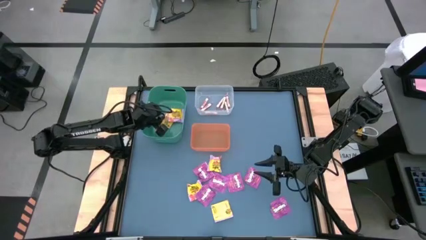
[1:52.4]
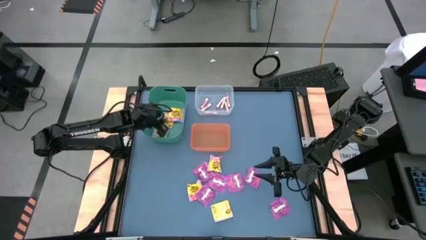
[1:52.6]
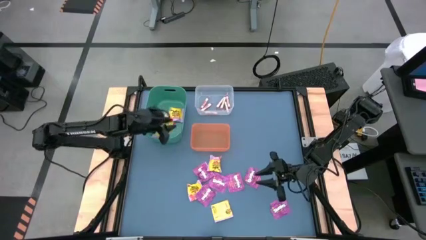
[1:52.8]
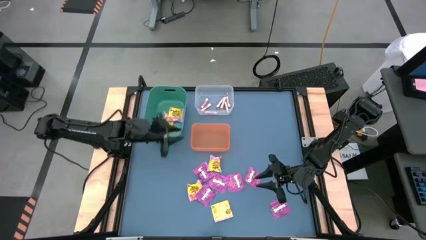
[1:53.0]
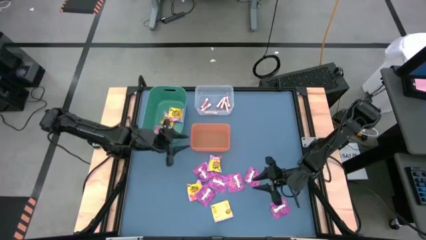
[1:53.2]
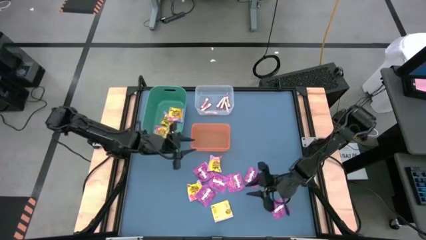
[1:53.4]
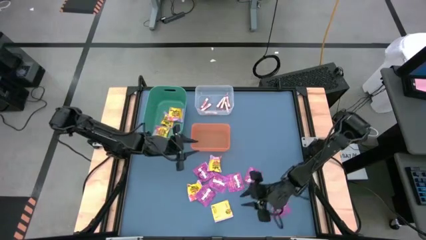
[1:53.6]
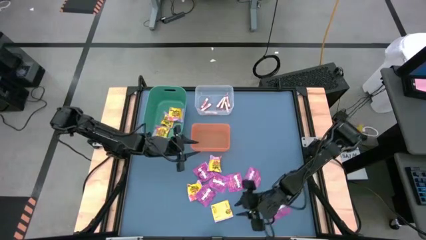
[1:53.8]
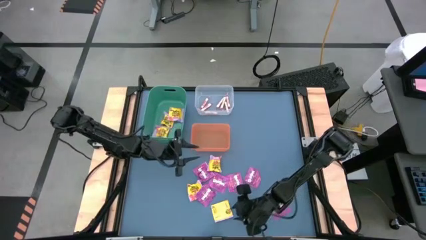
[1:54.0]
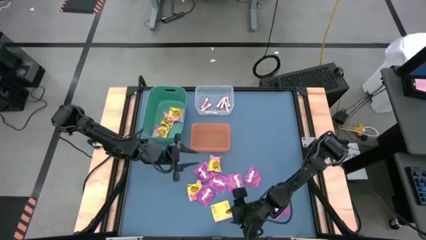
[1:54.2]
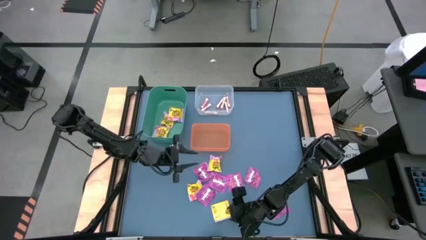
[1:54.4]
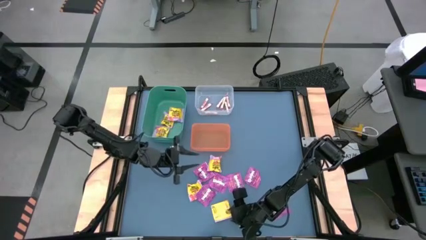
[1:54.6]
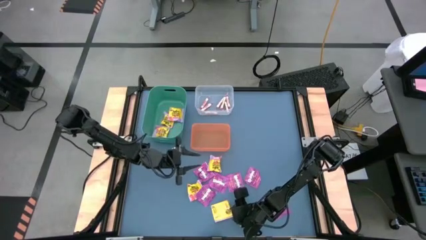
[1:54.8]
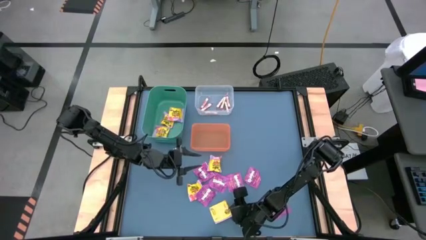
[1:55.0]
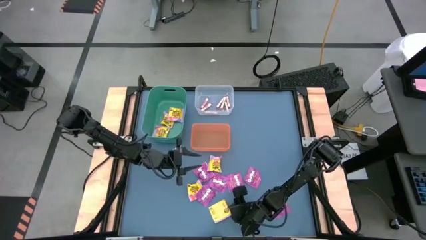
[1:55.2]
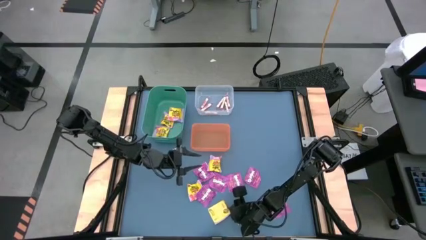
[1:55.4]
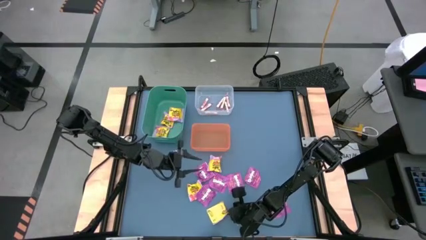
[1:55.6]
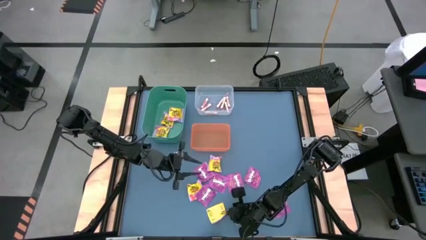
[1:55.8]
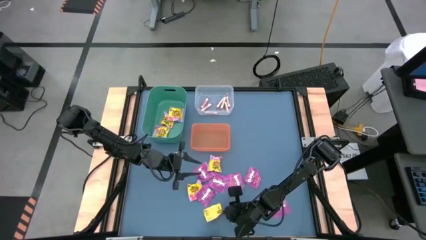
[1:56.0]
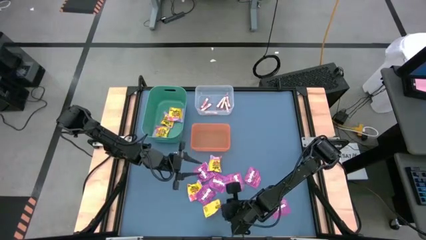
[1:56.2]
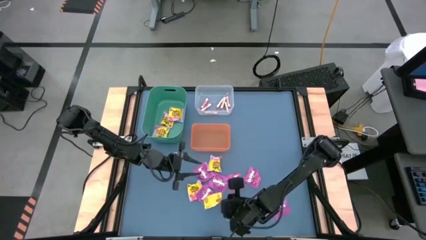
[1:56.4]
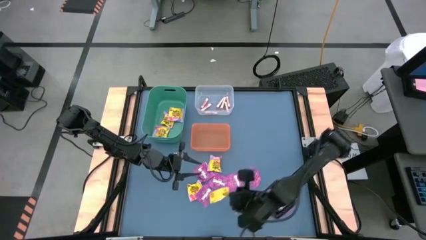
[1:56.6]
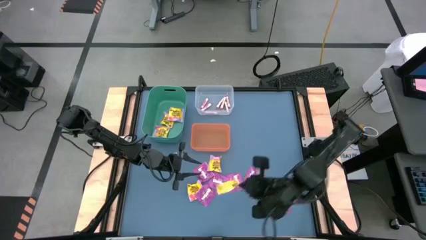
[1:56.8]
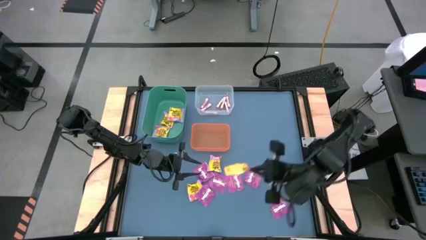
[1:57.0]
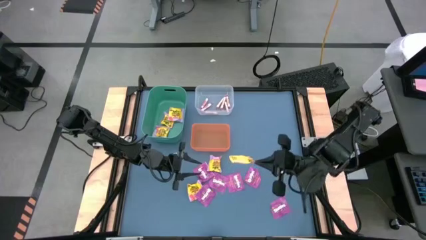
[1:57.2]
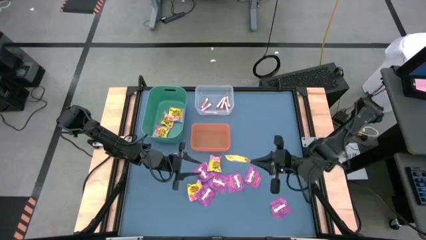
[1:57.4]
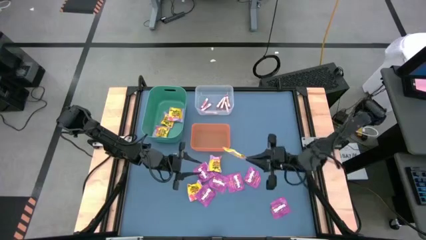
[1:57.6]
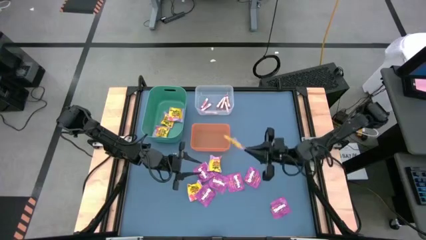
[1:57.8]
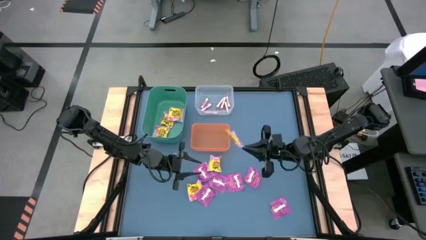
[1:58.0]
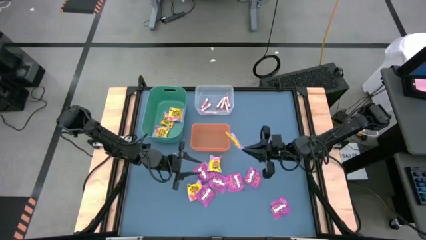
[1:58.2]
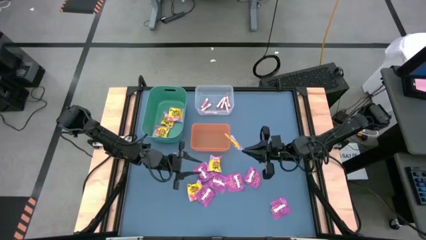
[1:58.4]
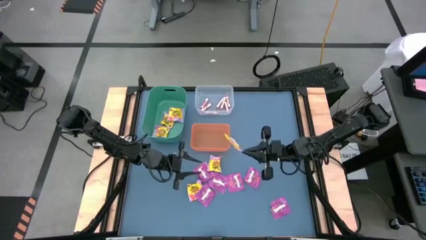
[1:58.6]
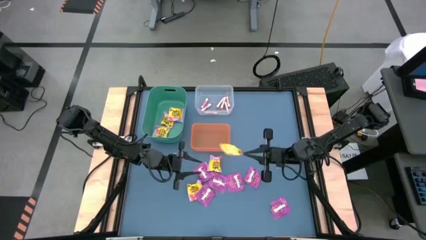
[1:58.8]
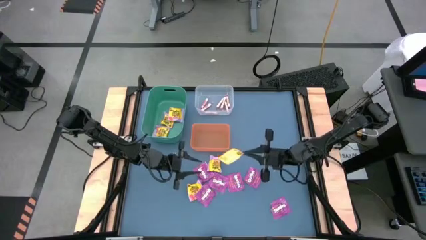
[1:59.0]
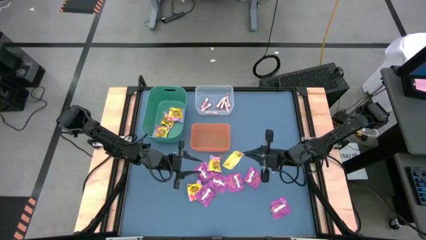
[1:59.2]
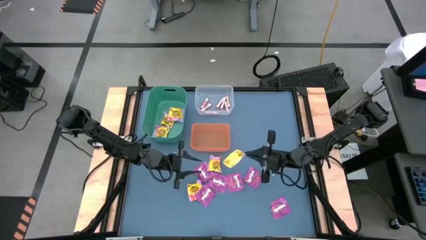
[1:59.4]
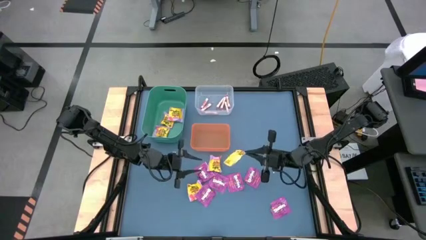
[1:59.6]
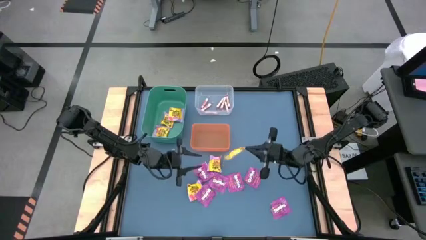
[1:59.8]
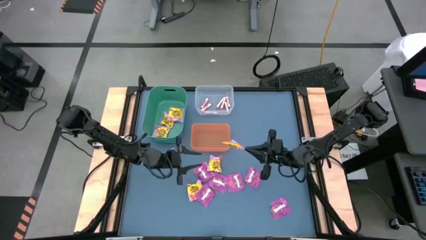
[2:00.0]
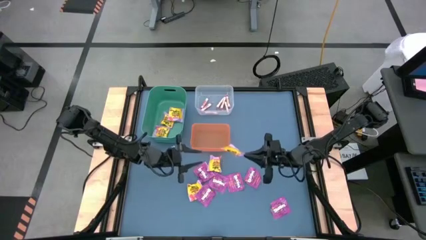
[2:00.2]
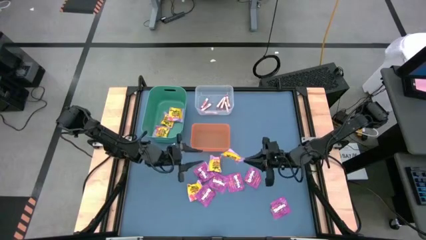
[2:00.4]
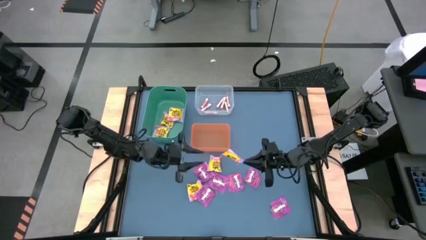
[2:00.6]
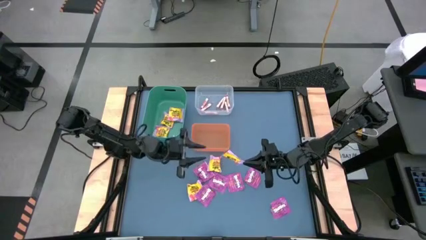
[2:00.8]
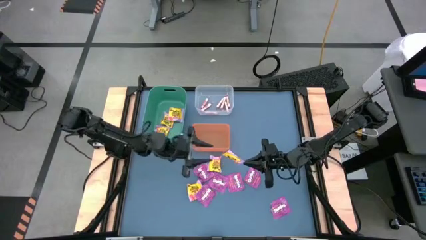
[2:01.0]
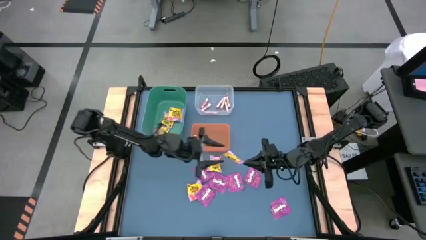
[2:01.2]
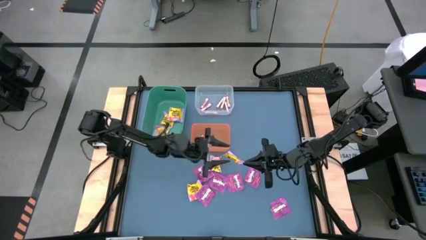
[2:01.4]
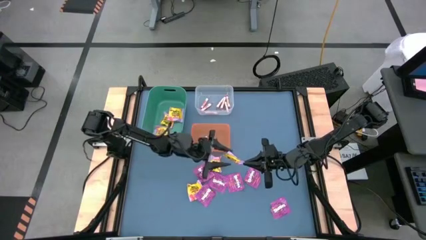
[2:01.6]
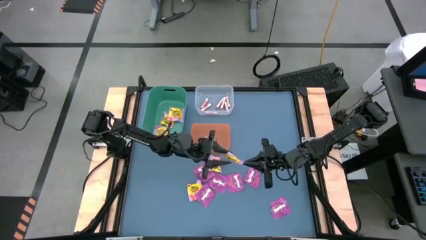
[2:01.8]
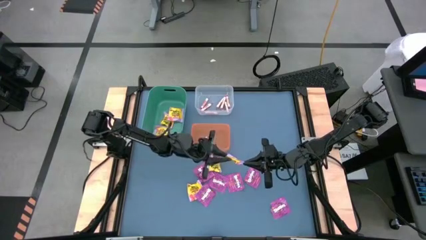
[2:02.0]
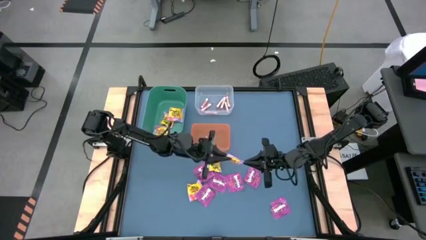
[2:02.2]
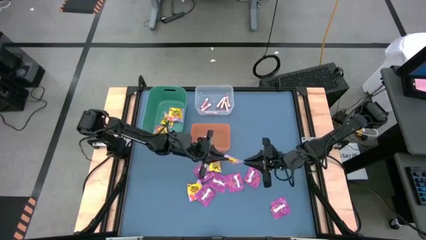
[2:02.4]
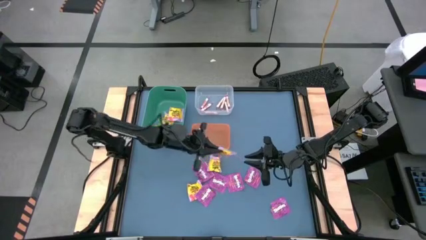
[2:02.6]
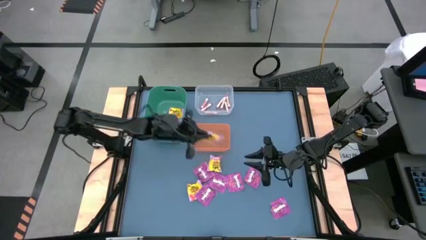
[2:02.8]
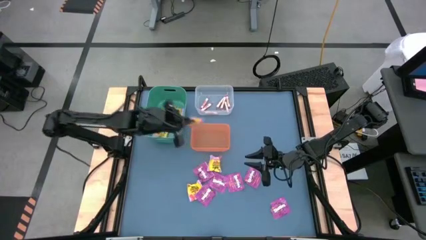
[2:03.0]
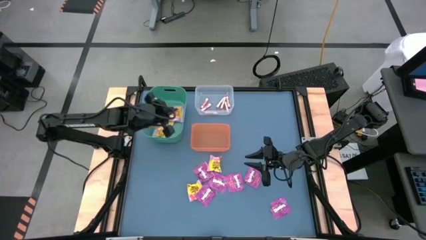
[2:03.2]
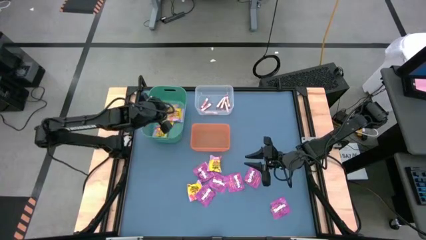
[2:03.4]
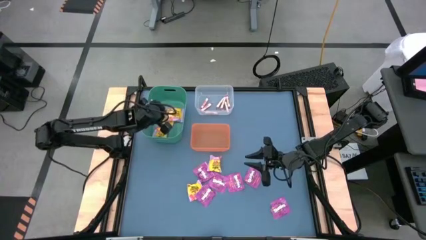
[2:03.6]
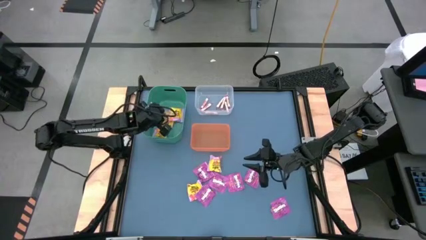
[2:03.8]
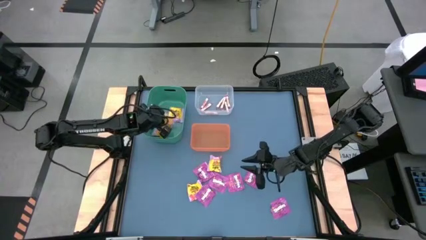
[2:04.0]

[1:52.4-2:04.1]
Task: Sort candy
Put the yellow candy into the green bin

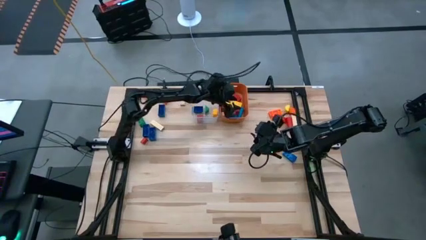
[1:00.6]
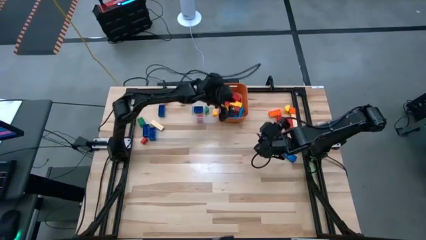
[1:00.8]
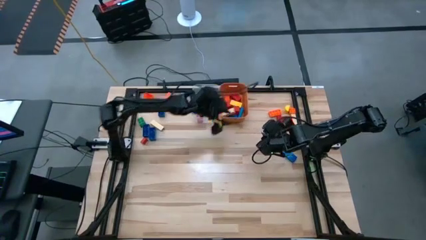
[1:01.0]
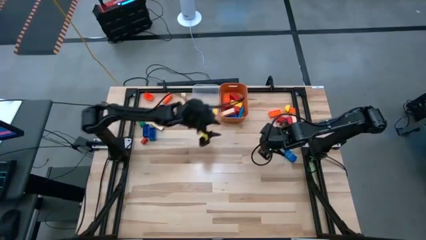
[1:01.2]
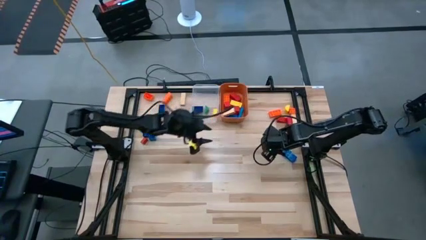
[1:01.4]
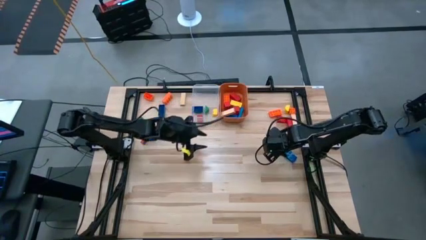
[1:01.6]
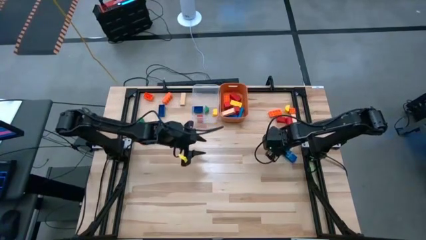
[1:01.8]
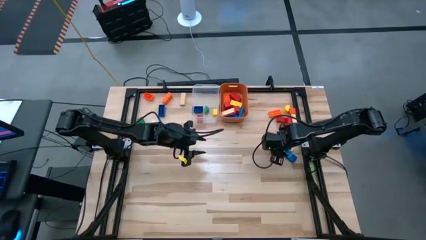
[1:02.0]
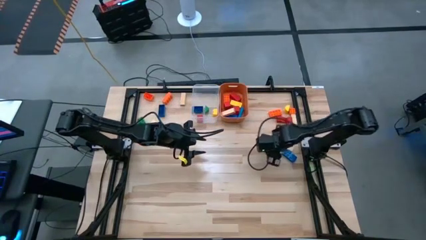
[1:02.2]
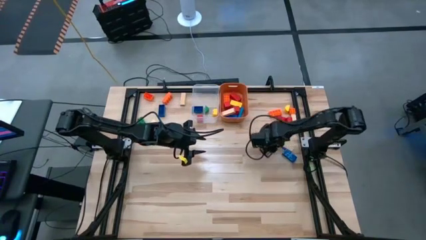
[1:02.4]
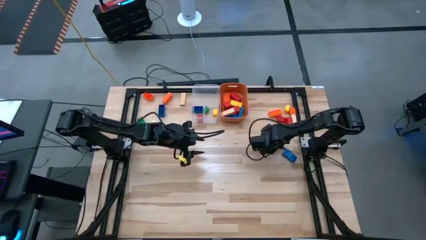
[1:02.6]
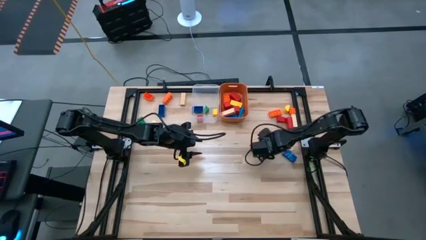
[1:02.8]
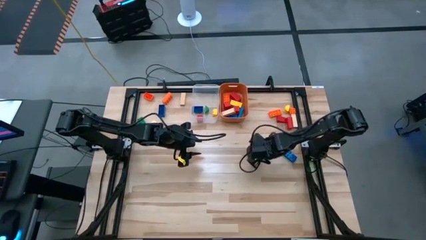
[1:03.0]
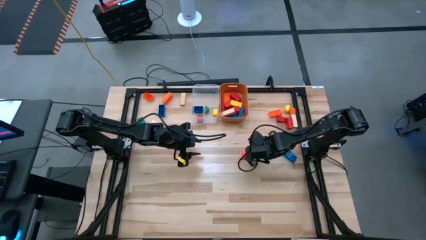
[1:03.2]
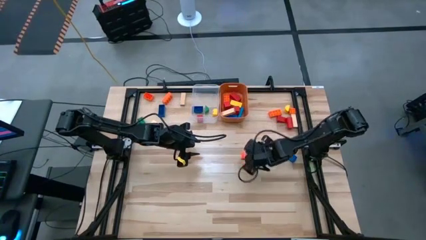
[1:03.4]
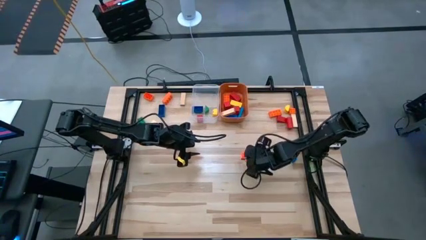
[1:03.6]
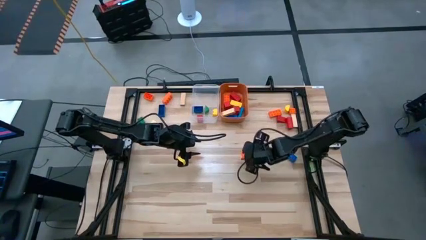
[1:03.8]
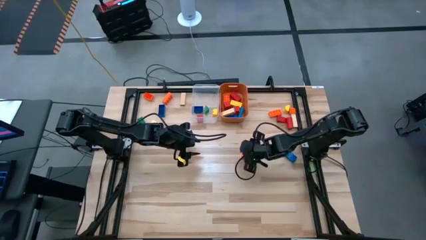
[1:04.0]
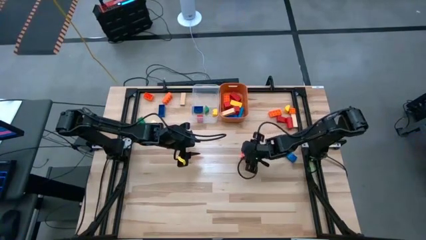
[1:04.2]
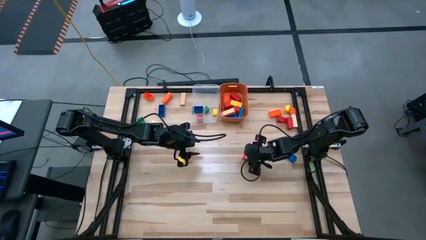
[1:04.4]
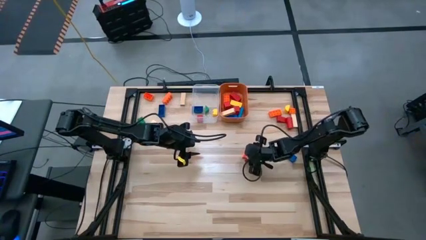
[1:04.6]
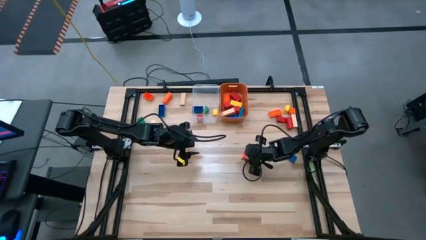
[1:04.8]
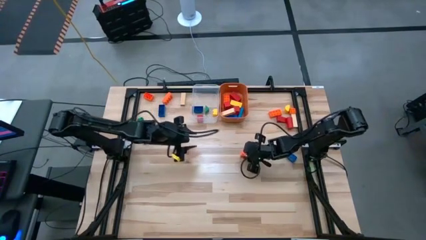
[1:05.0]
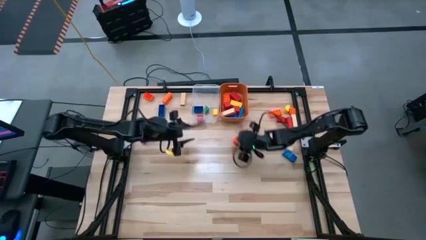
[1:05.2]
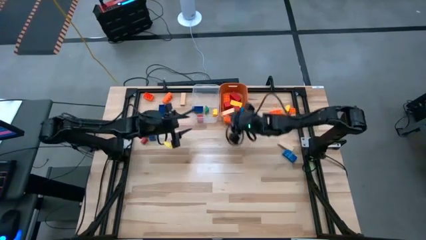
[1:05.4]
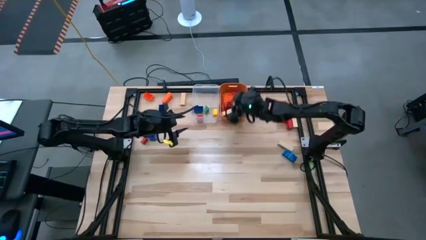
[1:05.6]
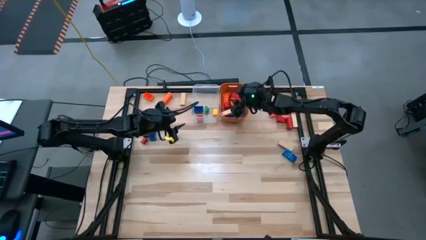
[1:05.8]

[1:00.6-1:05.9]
Task: Sort blocks by size
Put the orange rectangle game piece into the orange bin
